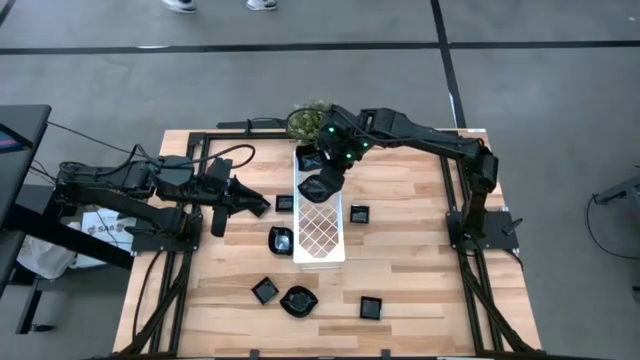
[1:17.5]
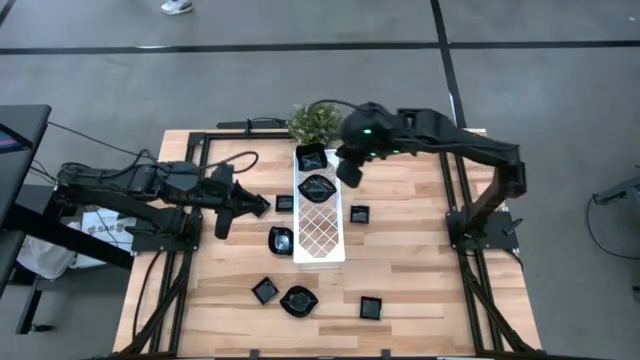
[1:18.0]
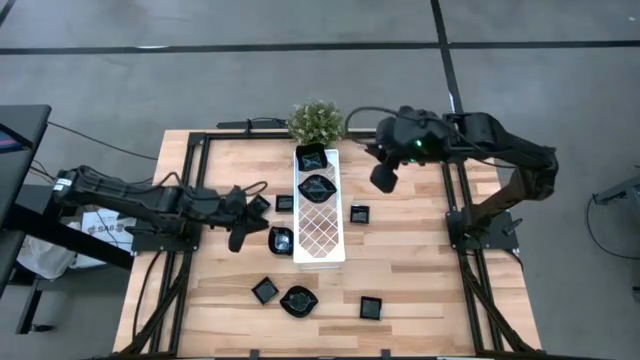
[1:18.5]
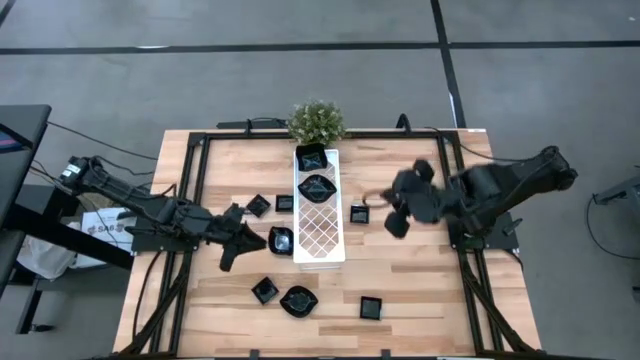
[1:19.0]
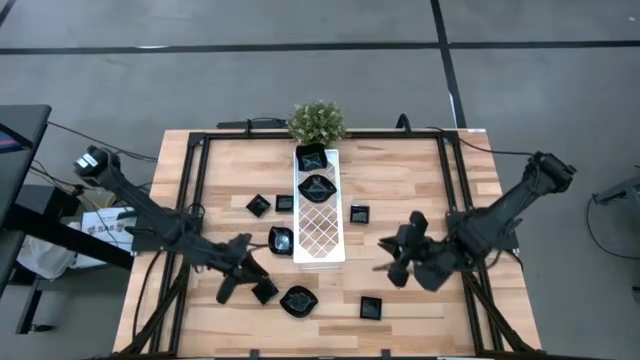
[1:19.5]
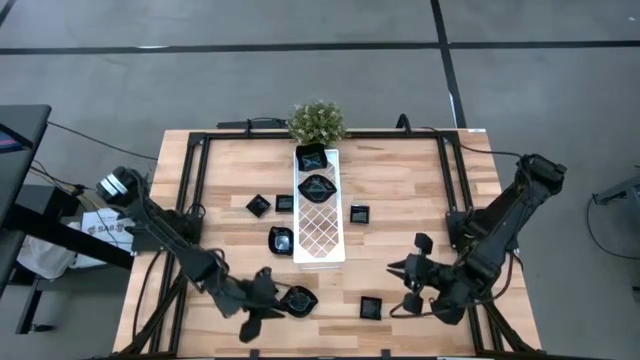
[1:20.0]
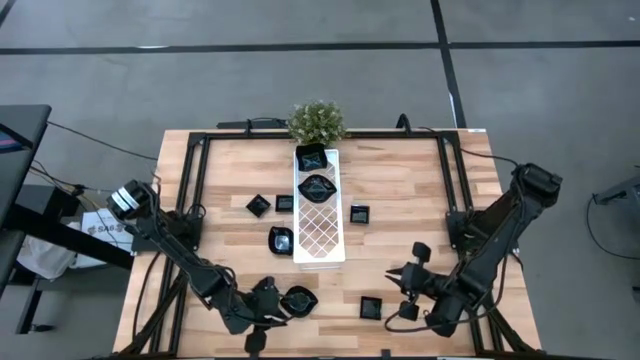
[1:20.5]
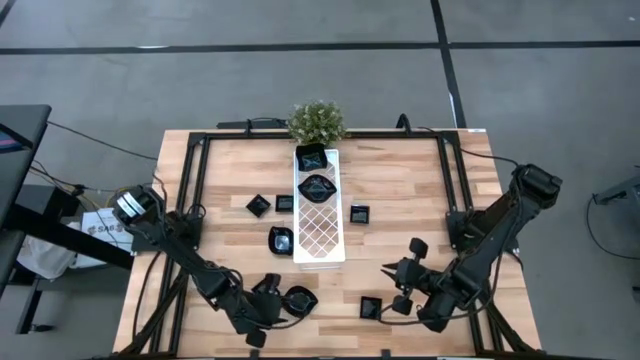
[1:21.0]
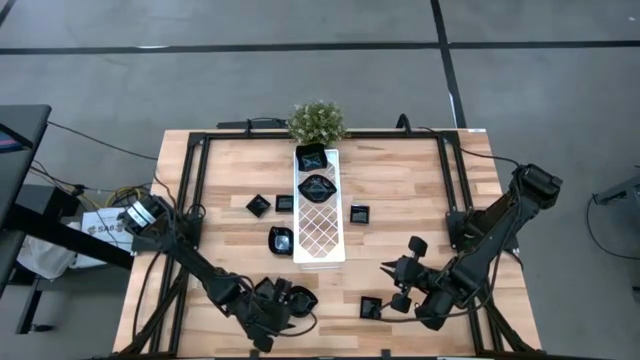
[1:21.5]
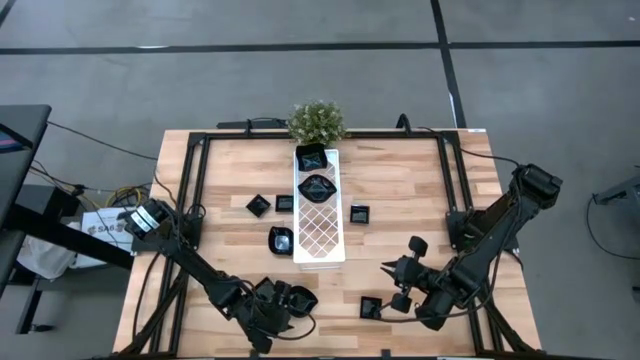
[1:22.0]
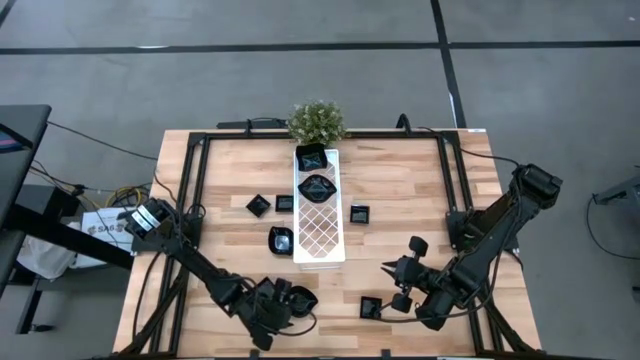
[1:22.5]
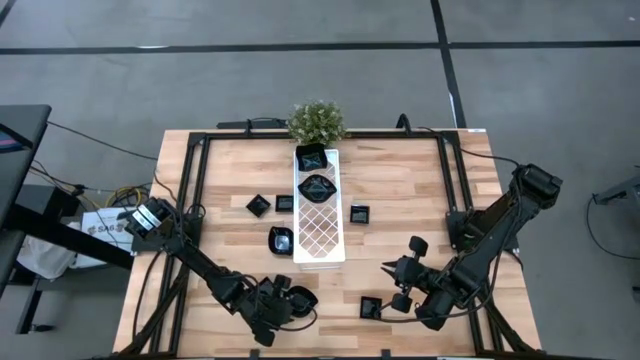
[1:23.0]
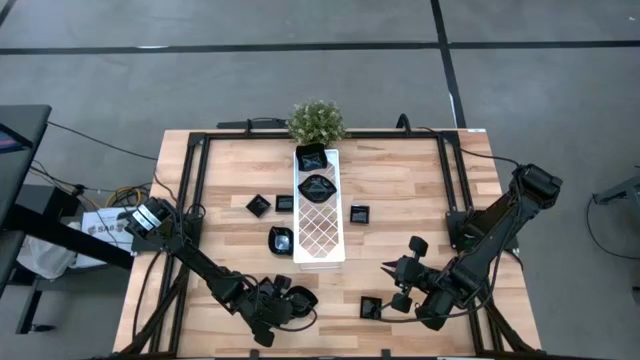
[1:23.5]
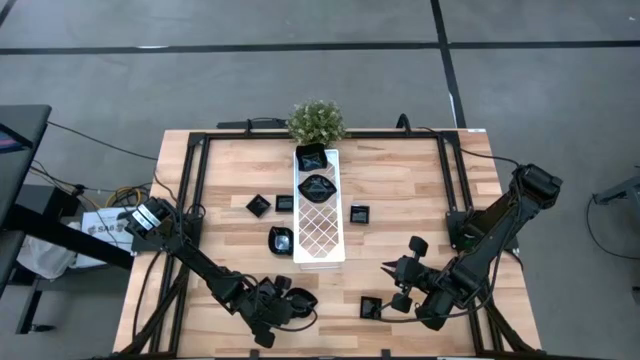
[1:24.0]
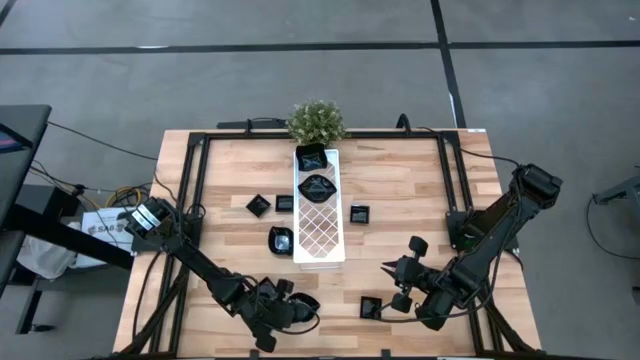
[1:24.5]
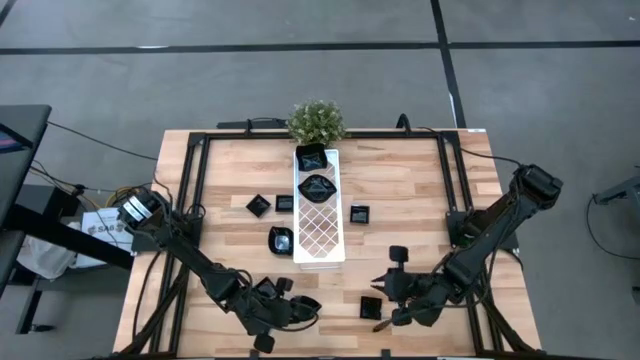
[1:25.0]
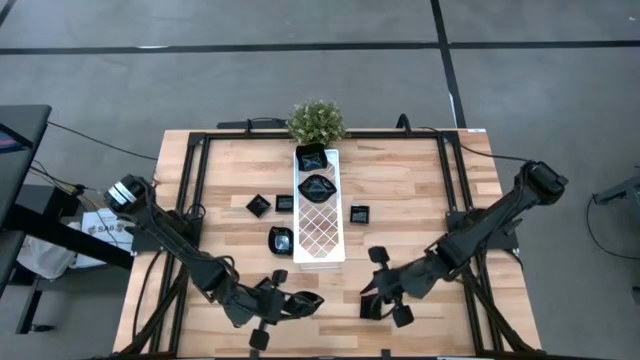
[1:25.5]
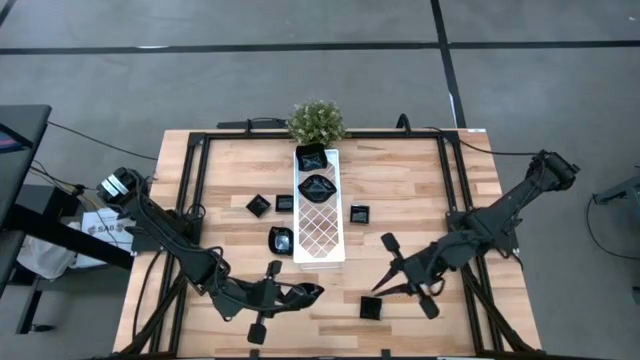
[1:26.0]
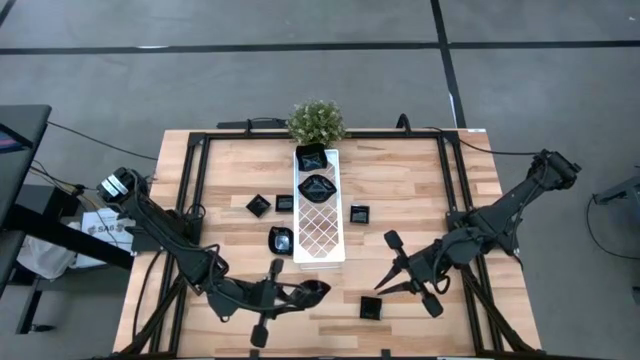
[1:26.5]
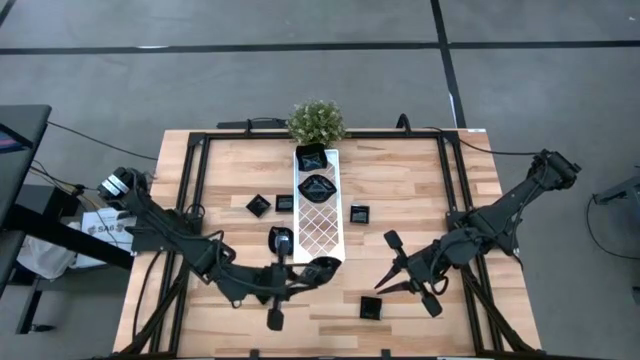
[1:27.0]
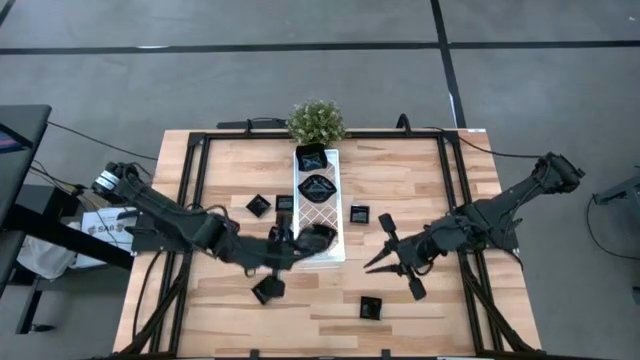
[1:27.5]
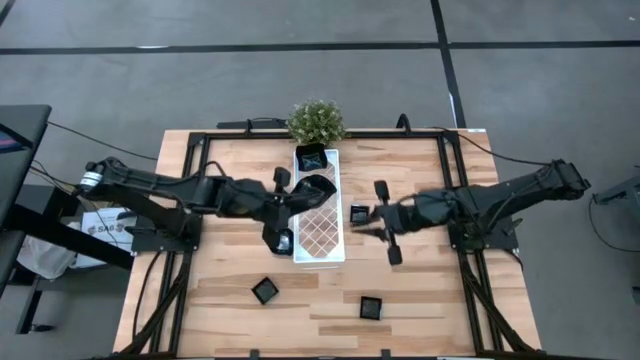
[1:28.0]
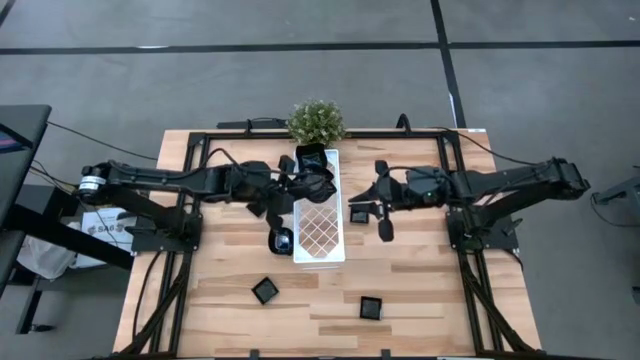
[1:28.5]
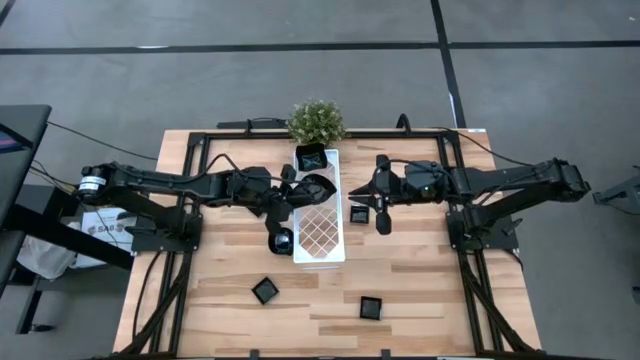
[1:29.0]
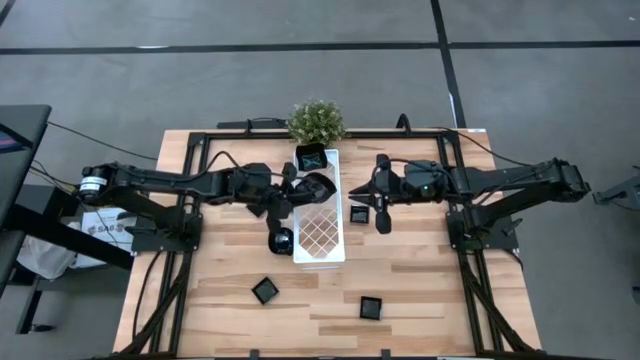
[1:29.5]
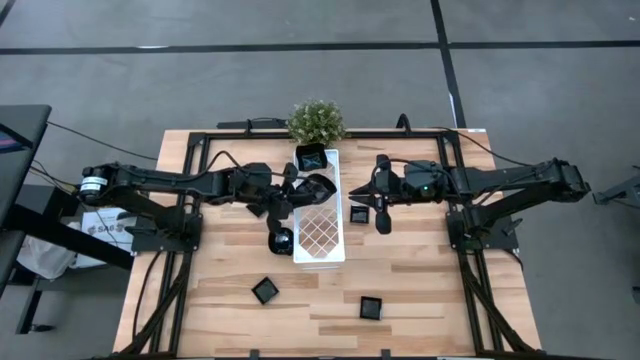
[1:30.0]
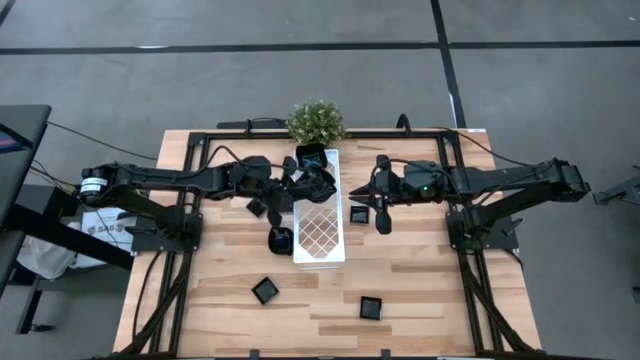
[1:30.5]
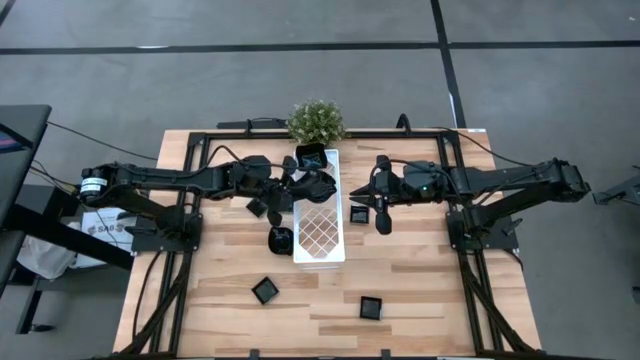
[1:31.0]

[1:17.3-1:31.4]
Task: Pick & Place Mini shaped plates
Stack the bottom leaf-shaped plate on the other leaf-shaped plate on the shelf

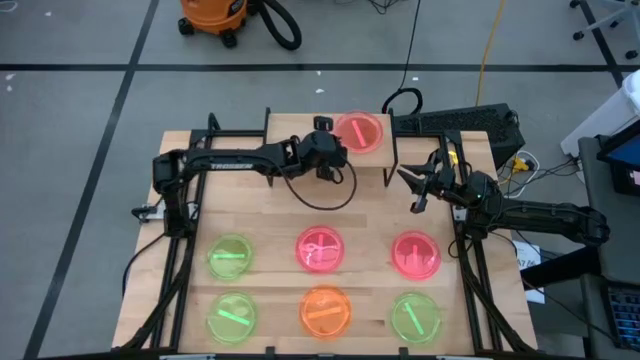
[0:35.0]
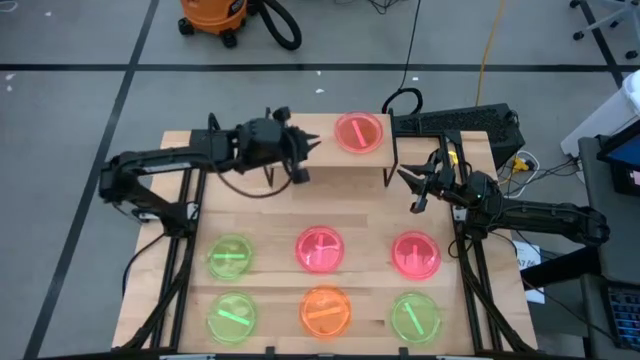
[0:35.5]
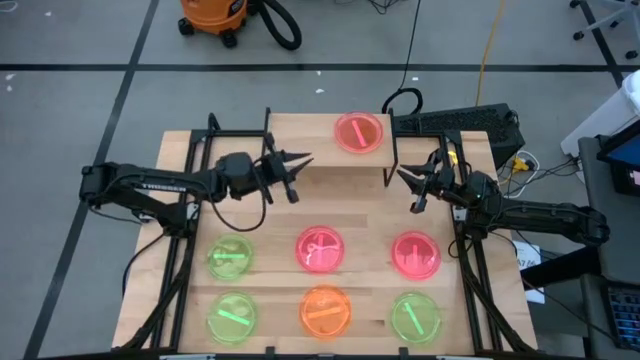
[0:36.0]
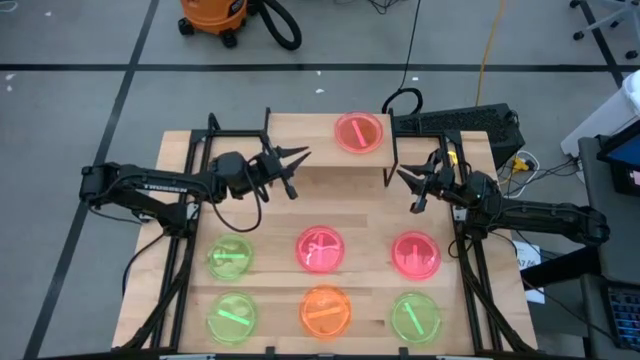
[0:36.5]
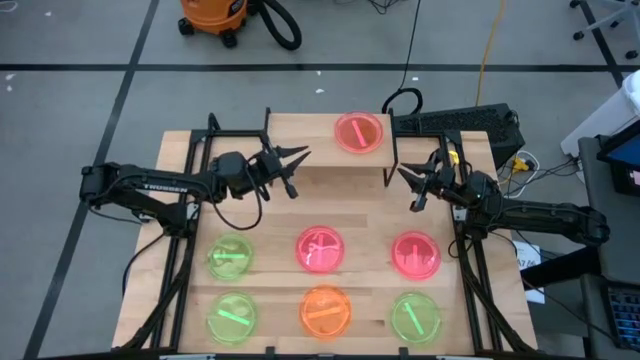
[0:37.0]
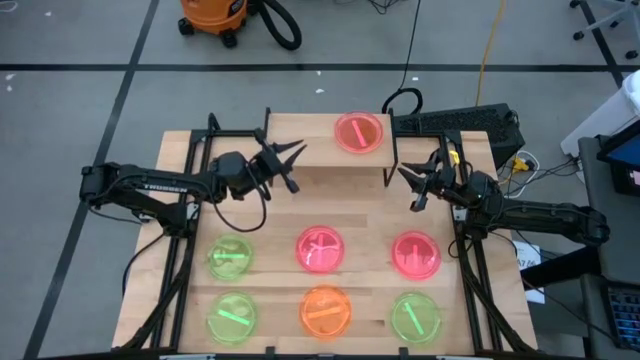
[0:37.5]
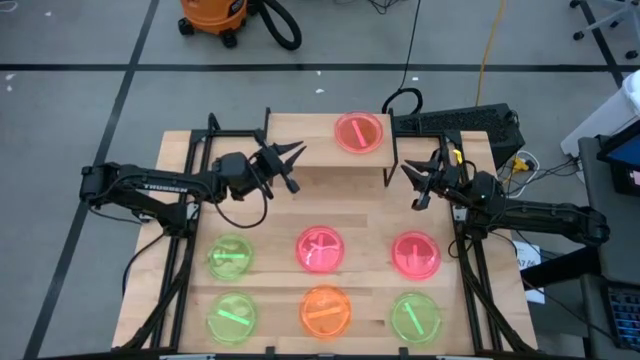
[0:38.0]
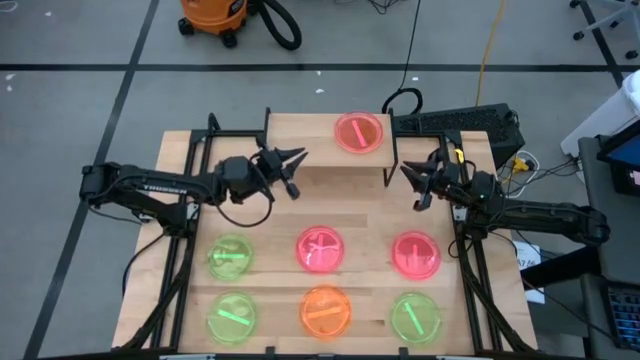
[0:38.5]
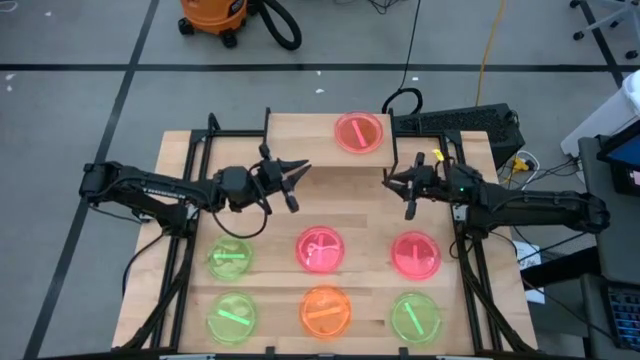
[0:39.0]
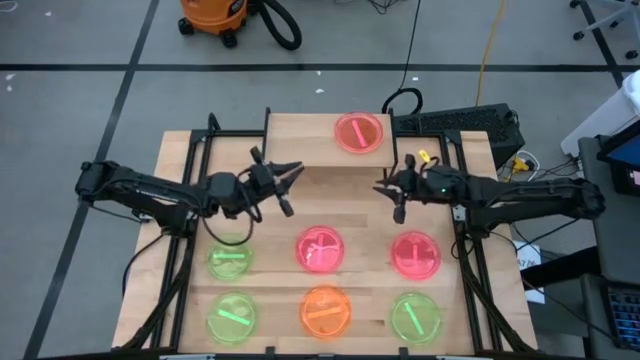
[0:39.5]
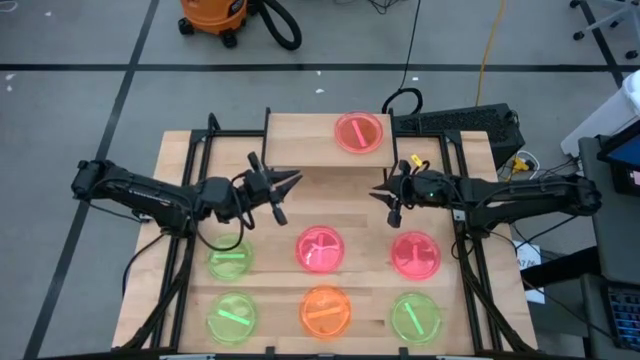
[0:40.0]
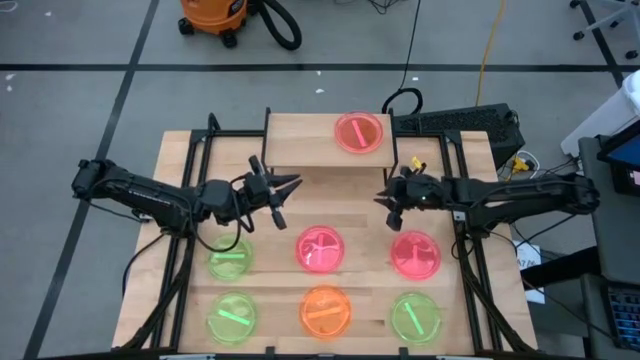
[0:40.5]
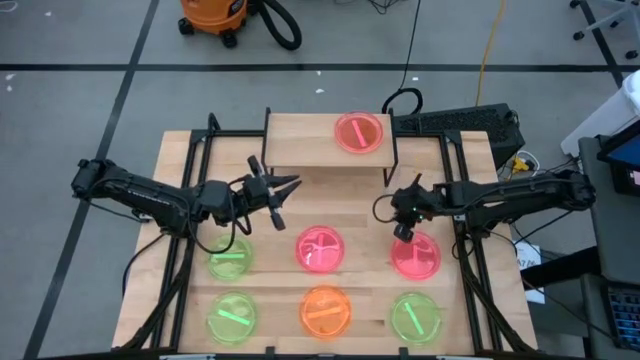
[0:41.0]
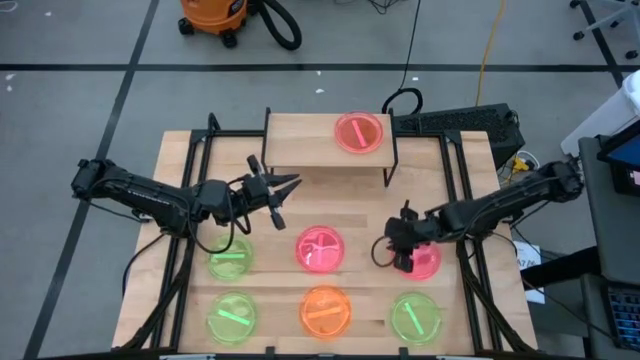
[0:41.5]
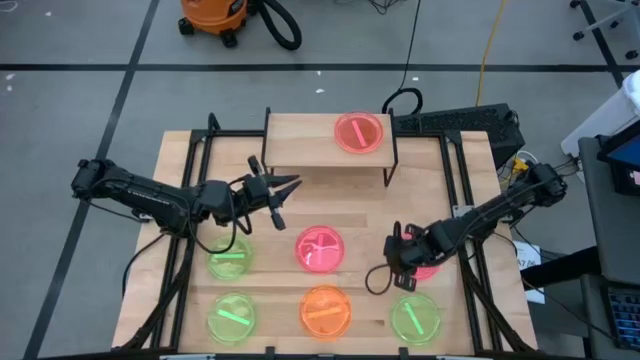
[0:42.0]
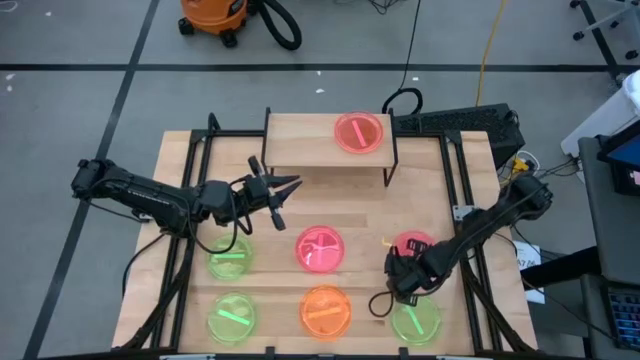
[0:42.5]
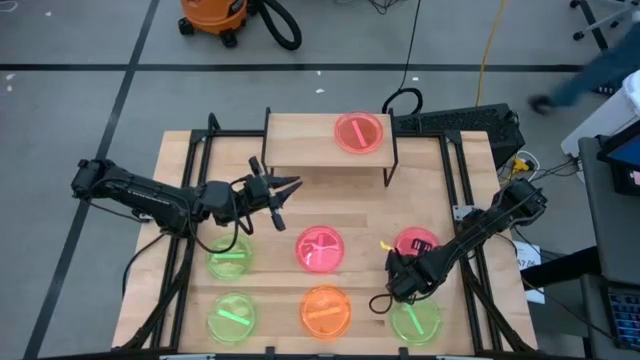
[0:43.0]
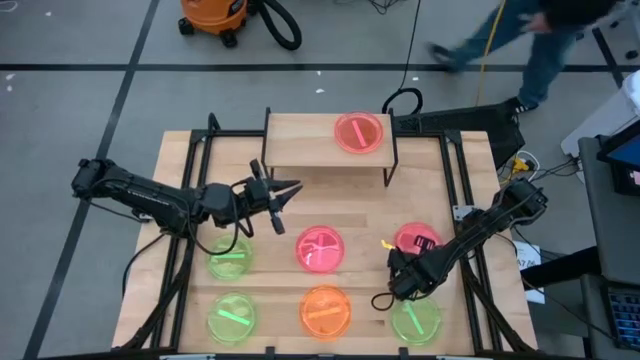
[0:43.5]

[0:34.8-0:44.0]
Task: Place and stack plates onto a shelf
Stack the pink plate on top of the pink plate on the shelf
